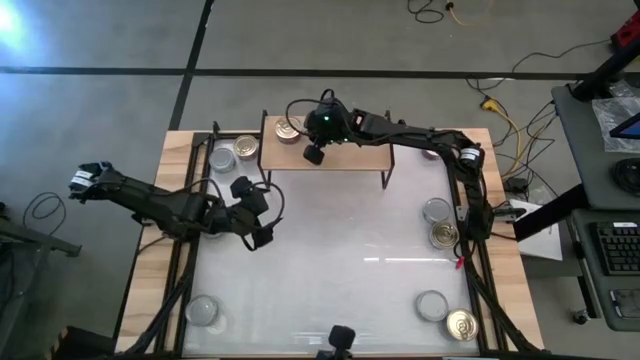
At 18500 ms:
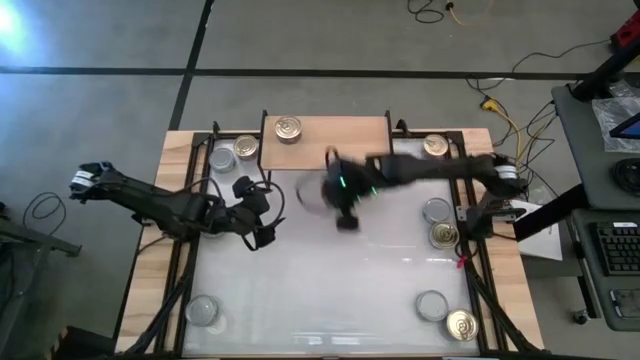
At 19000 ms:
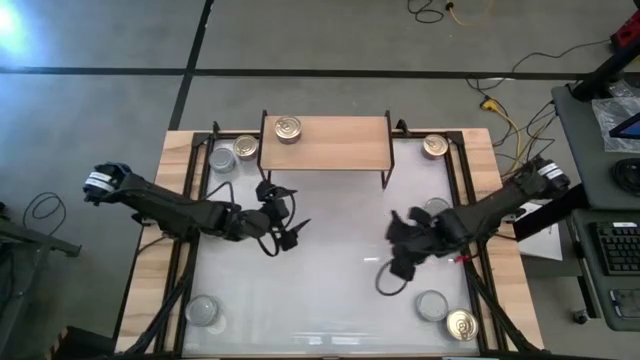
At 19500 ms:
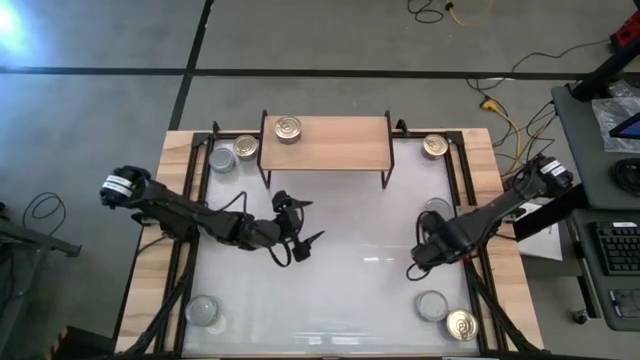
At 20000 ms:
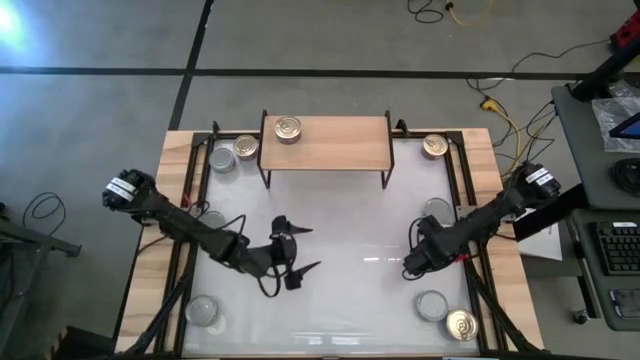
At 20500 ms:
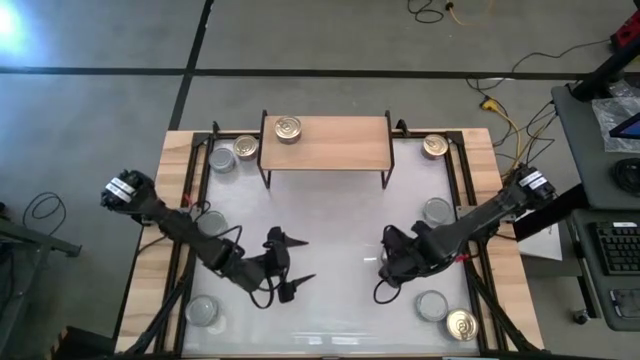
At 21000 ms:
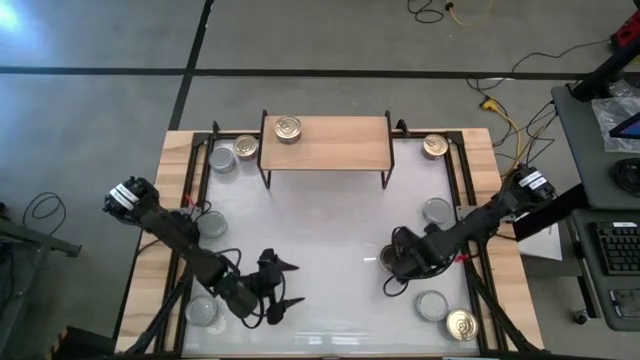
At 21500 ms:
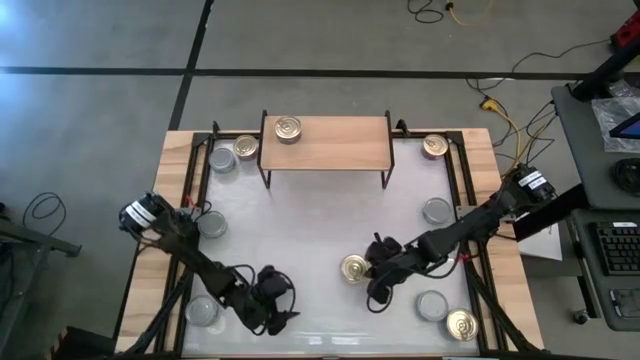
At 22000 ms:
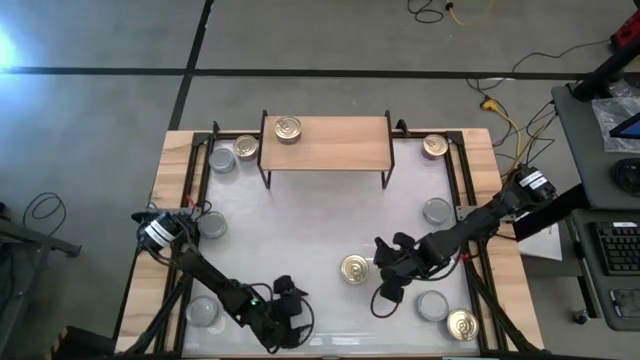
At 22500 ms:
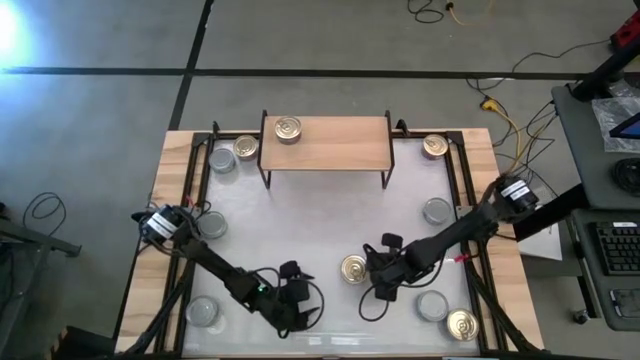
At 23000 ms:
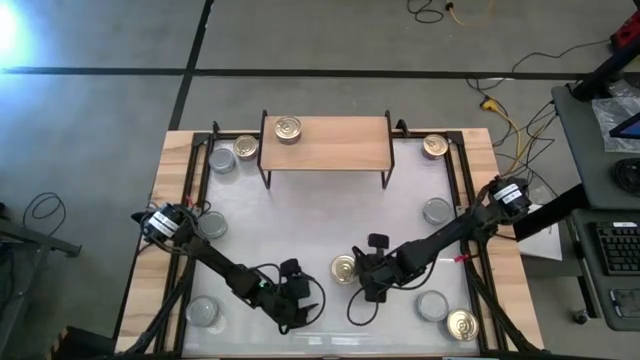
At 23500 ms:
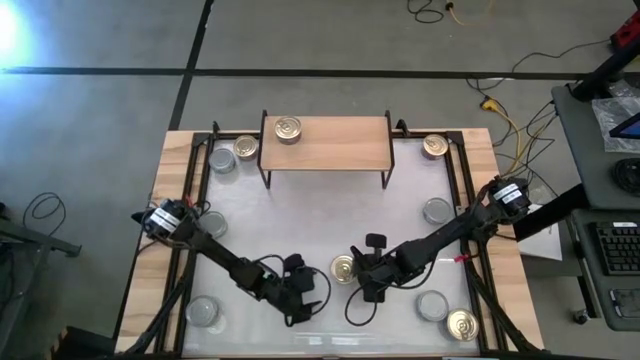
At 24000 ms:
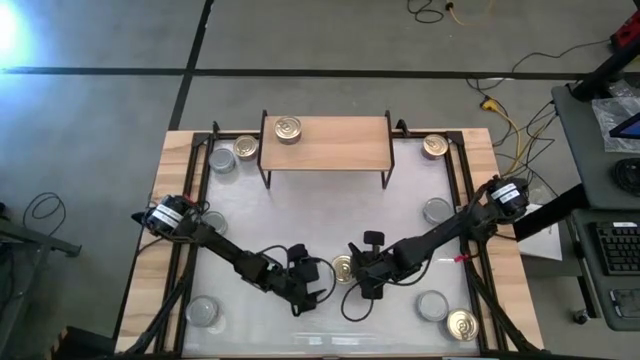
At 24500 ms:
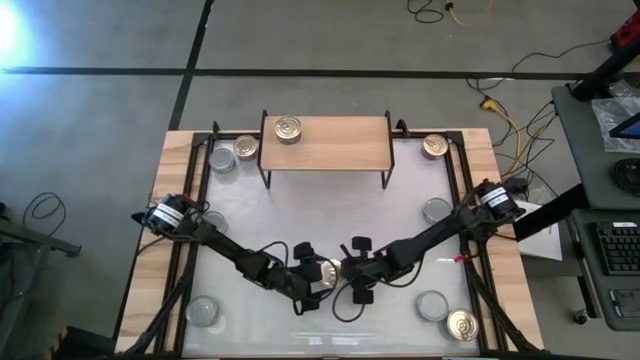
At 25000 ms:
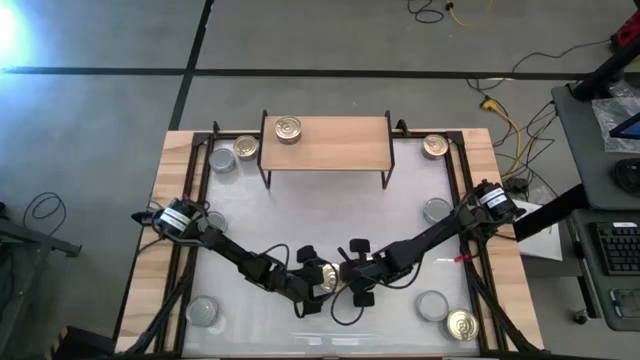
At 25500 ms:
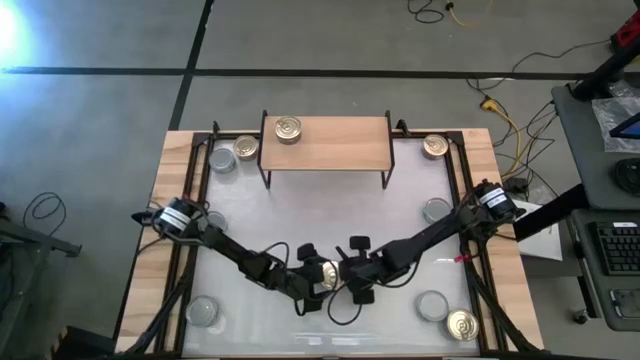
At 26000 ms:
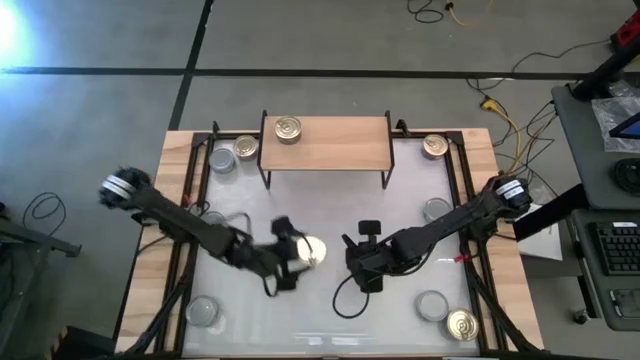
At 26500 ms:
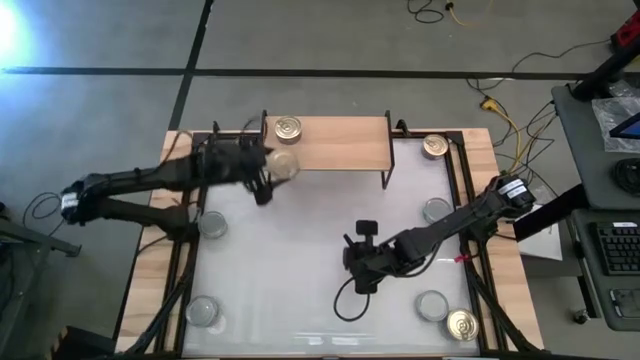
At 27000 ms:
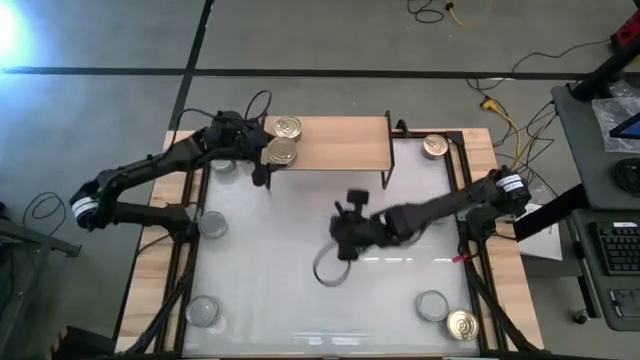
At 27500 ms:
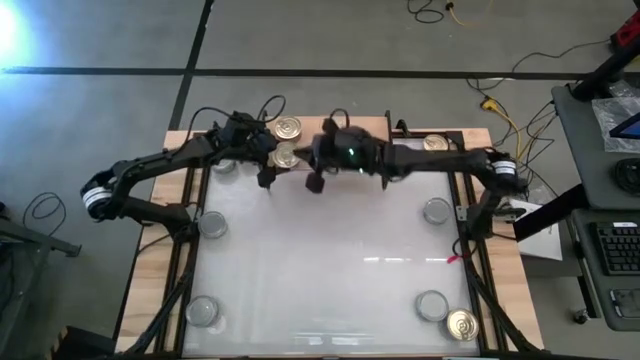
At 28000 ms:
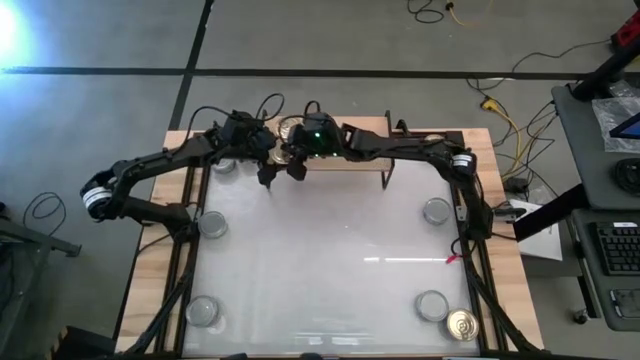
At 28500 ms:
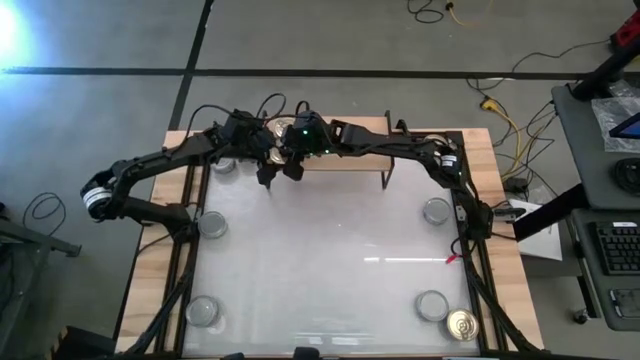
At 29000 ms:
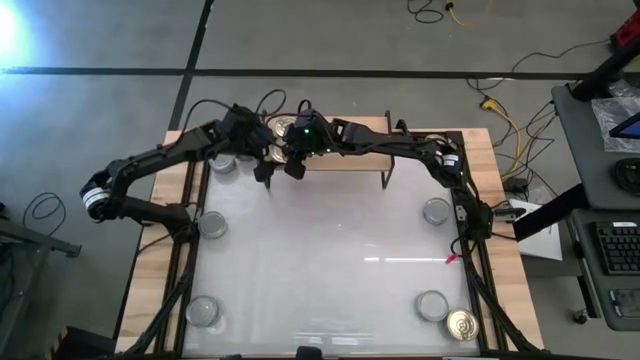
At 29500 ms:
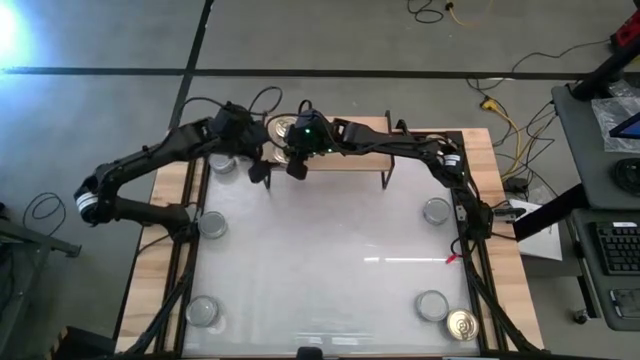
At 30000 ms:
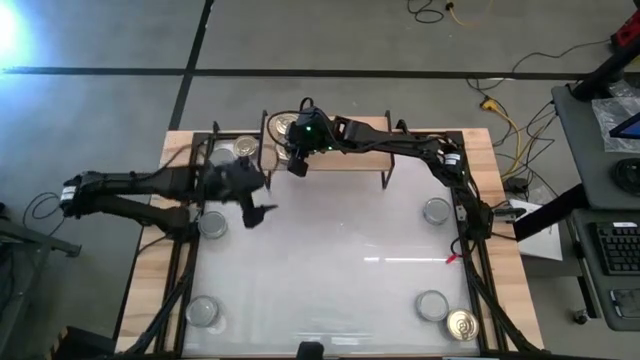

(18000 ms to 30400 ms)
Task: Stack canned seafood by type on shelf
Put the blue and pink tuna can on the shelf

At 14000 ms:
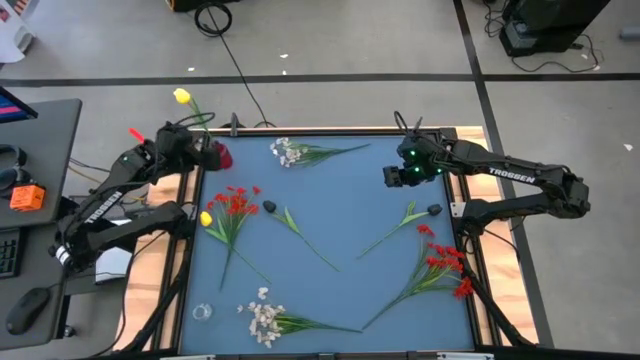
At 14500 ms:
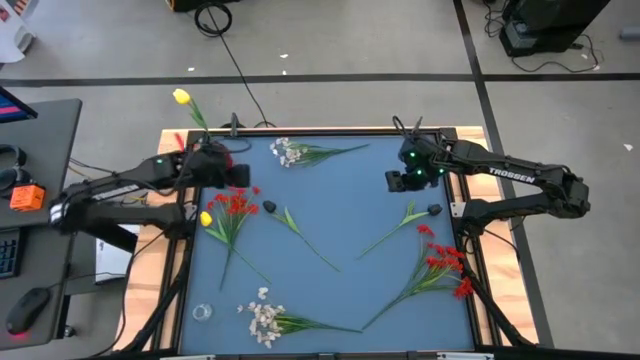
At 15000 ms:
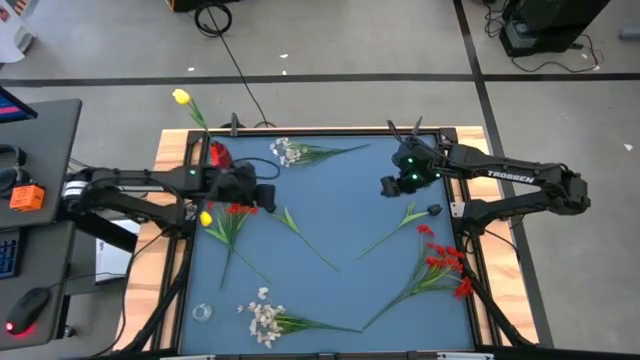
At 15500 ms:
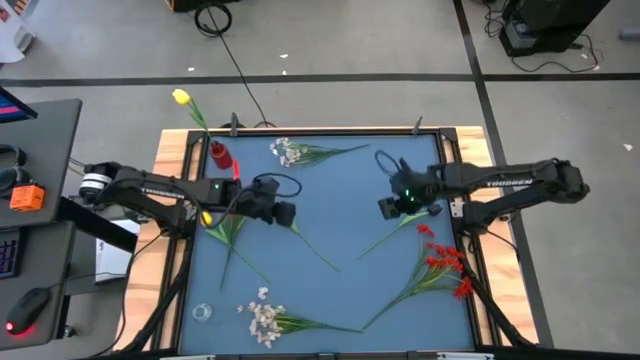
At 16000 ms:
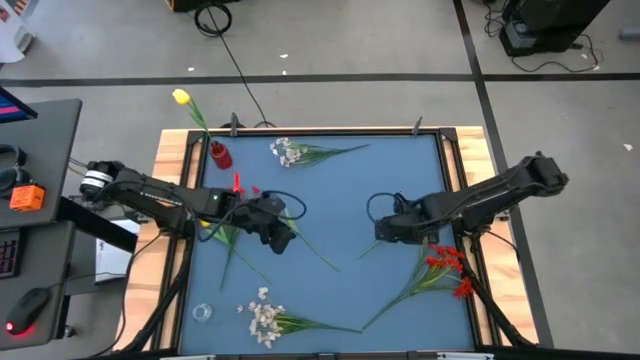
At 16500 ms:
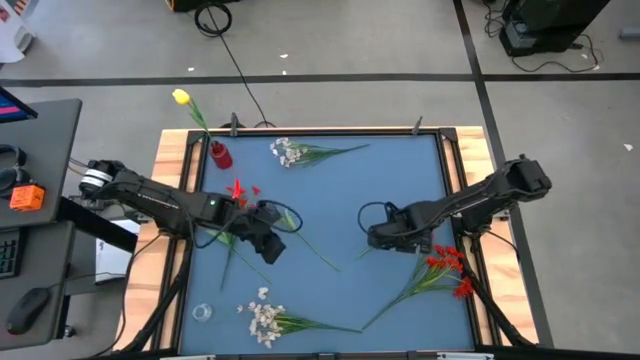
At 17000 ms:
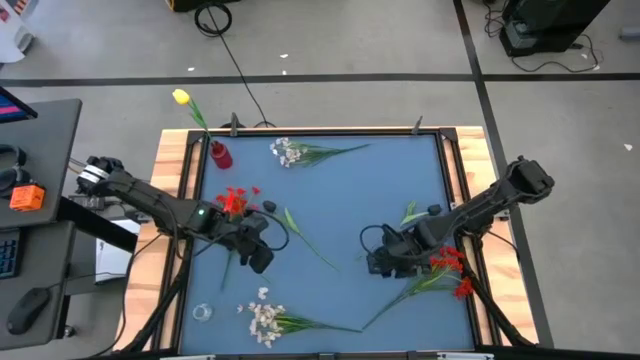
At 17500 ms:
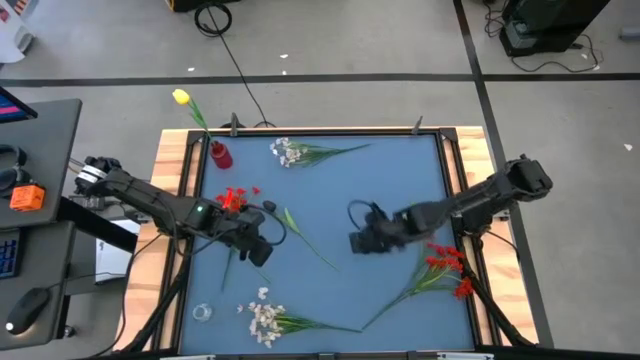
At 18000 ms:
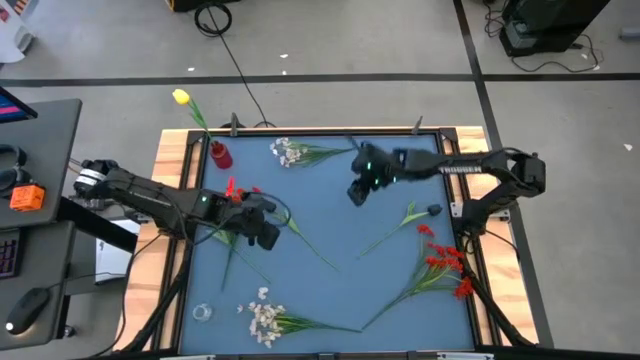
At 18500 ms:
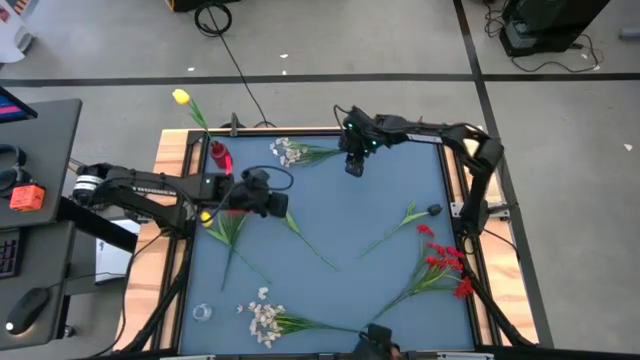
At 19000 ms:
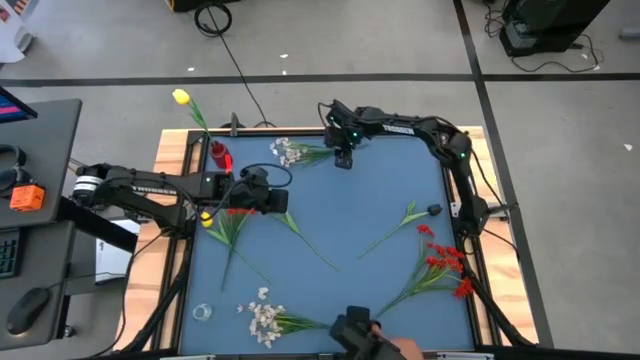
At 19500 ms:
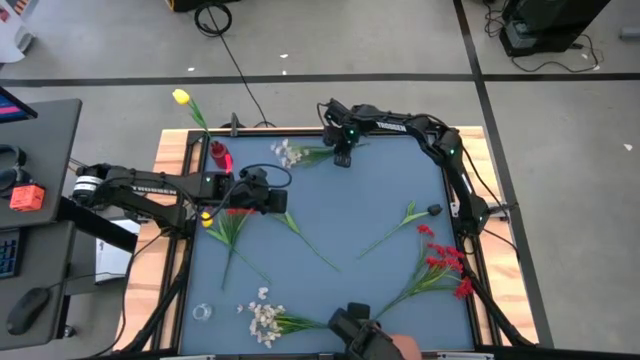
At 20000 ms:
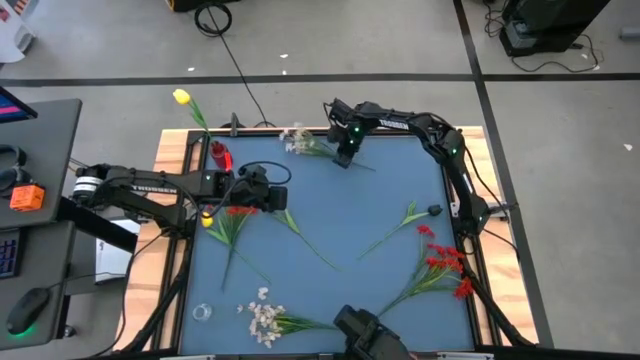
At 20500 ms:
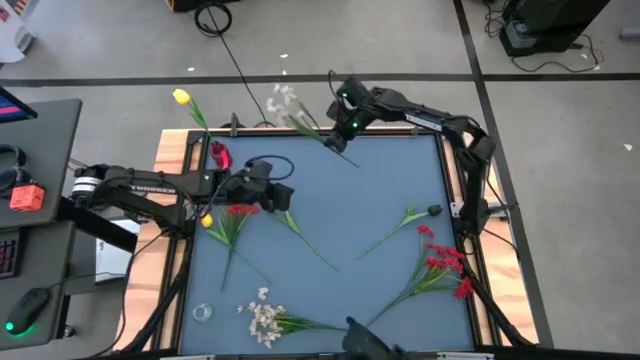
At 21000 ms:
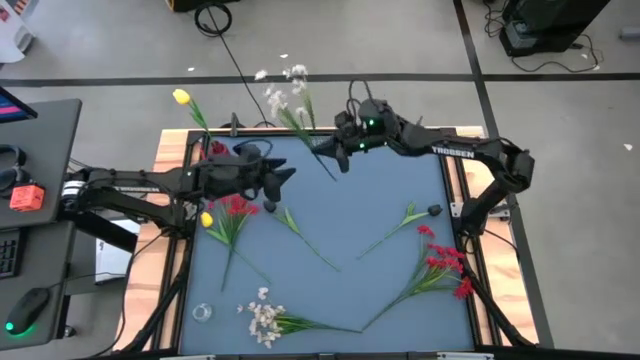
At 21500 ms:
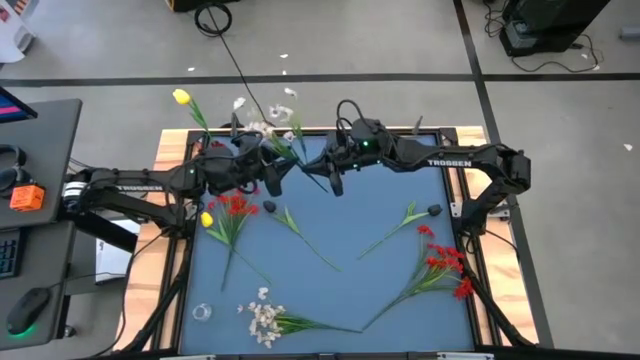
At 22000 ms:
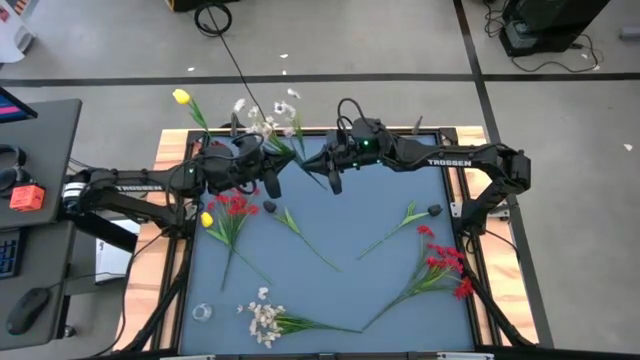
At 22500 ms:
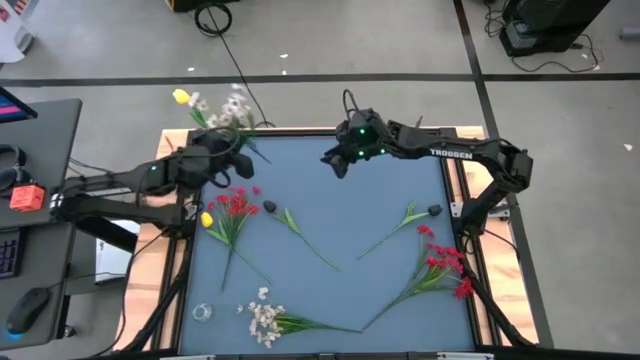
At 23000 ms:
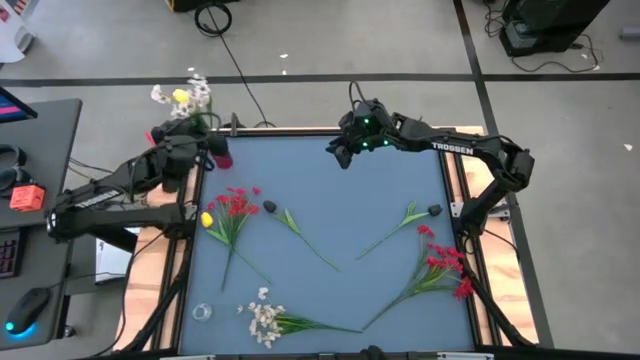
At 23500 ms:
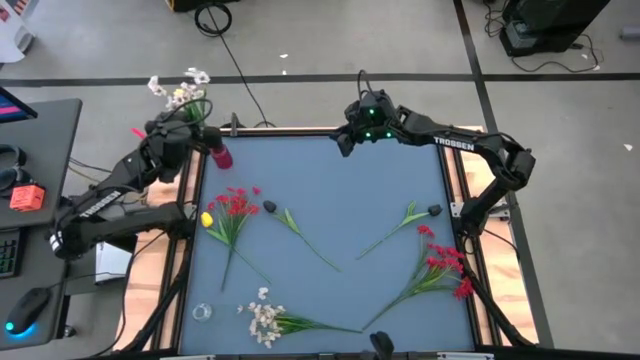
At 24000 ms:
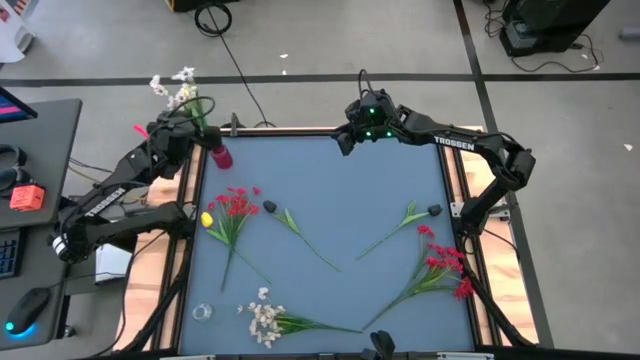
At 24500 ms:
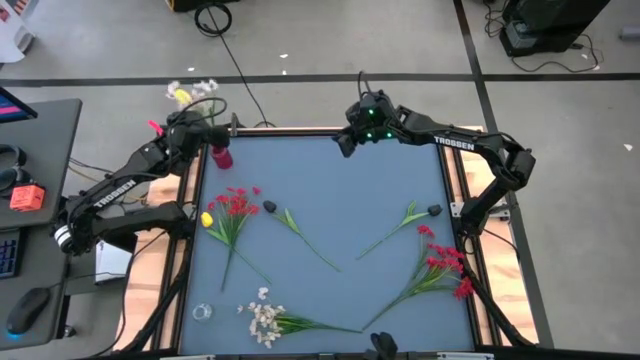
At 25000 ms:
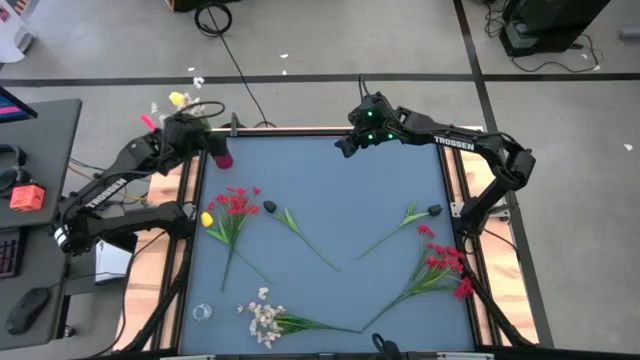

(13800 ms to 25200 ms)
Task: Sort flowers into vase by color
Put the top white flowers into the red vase
